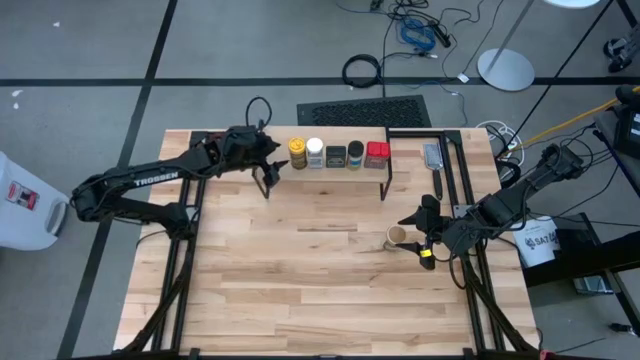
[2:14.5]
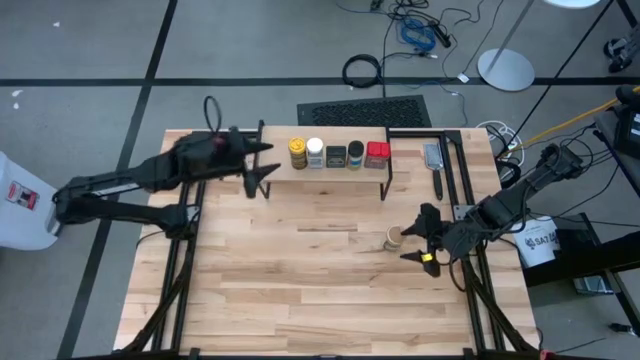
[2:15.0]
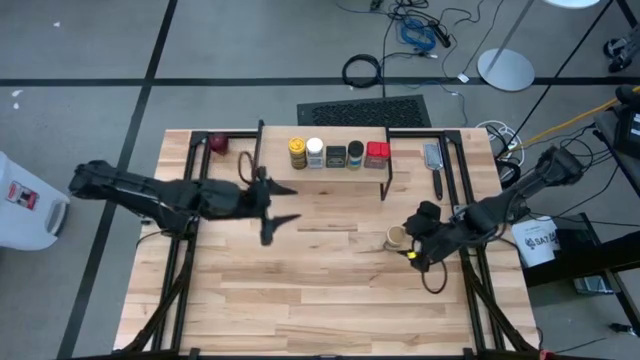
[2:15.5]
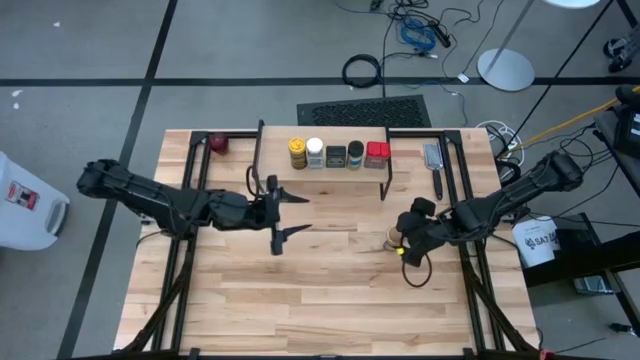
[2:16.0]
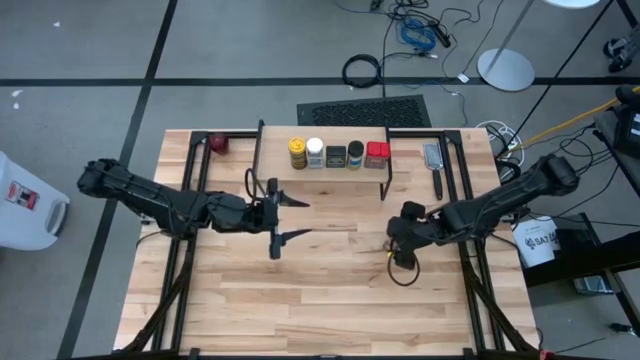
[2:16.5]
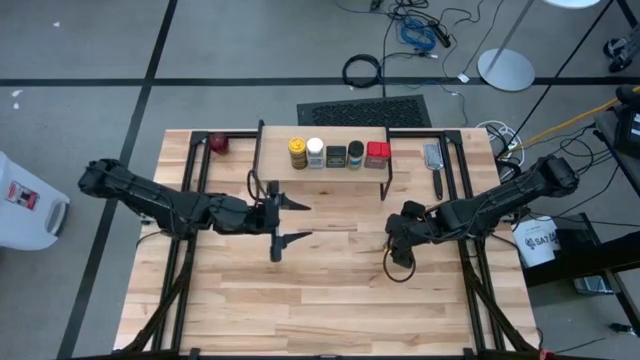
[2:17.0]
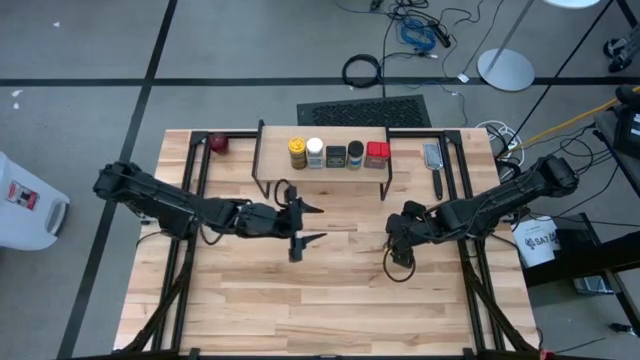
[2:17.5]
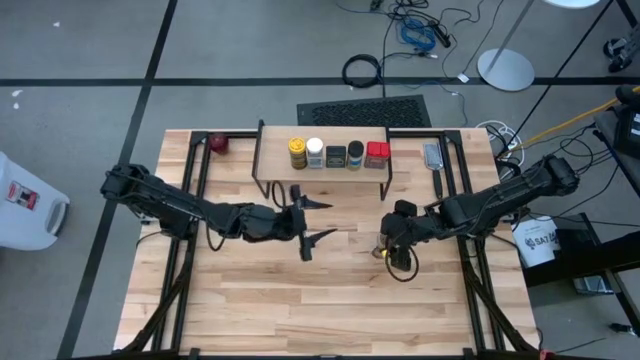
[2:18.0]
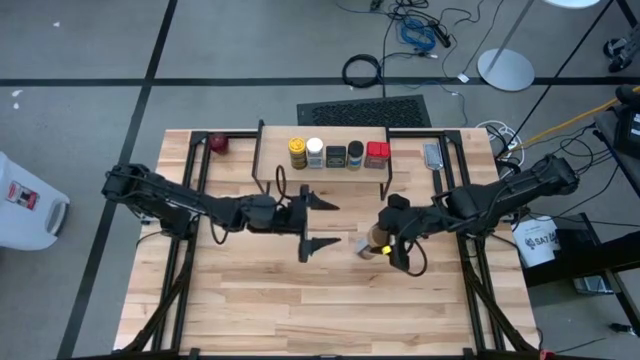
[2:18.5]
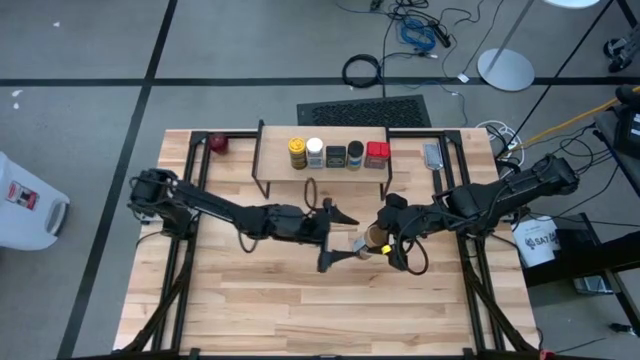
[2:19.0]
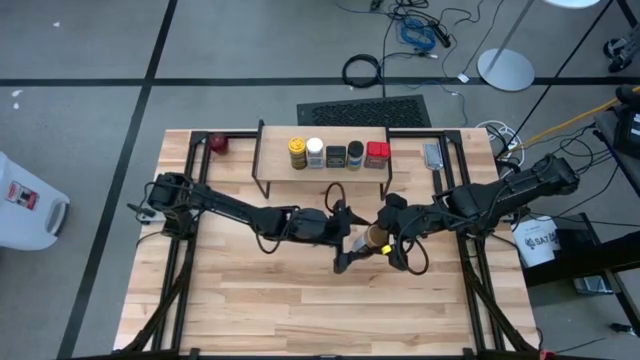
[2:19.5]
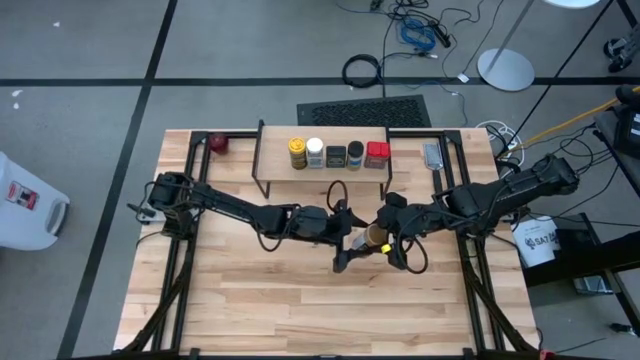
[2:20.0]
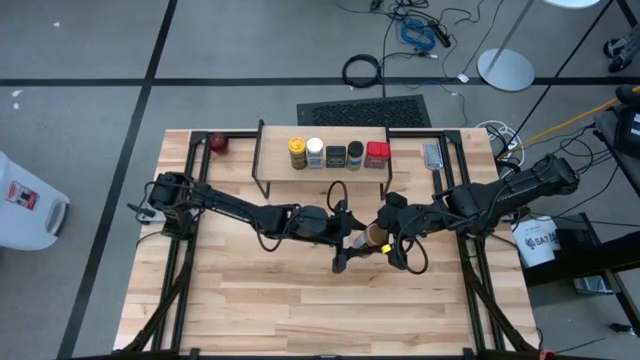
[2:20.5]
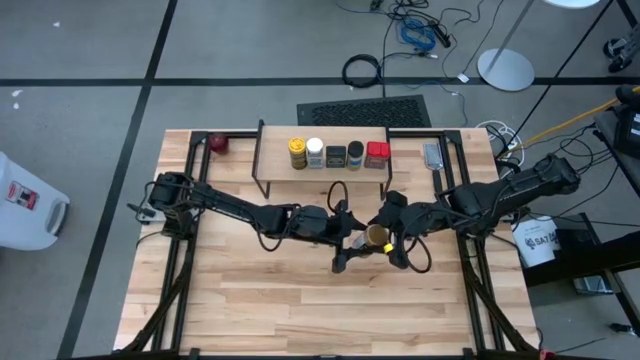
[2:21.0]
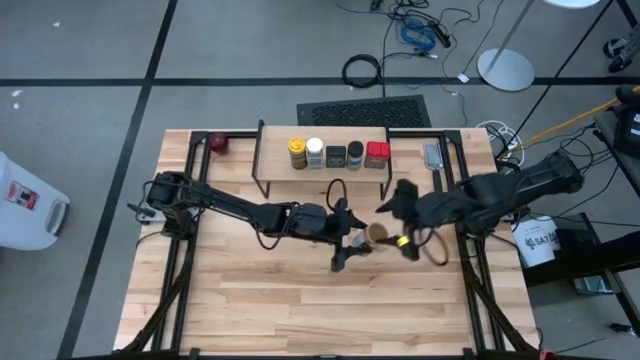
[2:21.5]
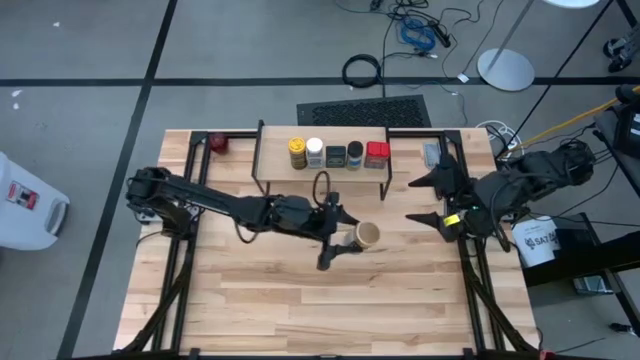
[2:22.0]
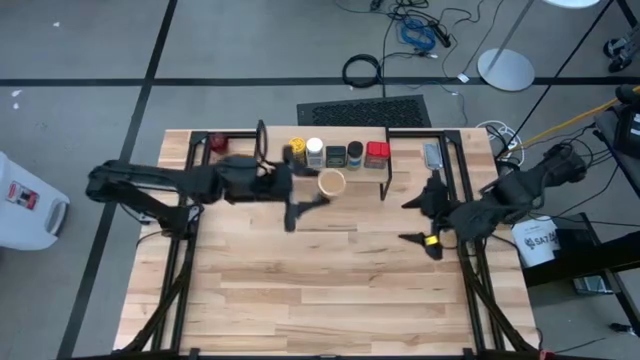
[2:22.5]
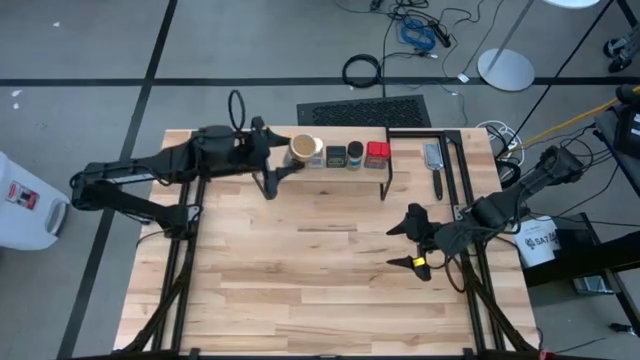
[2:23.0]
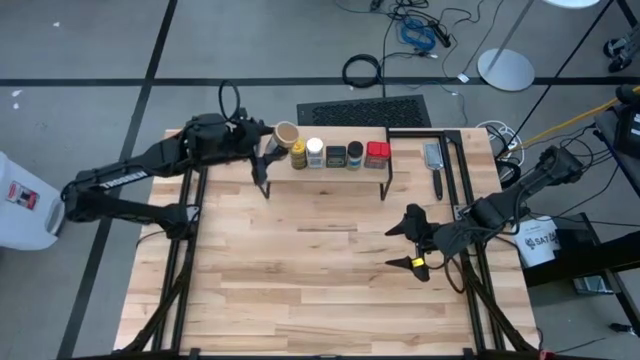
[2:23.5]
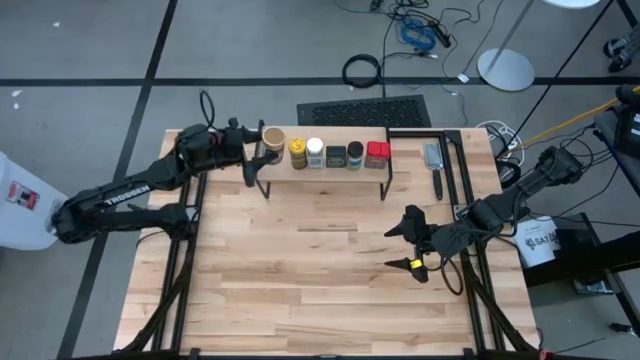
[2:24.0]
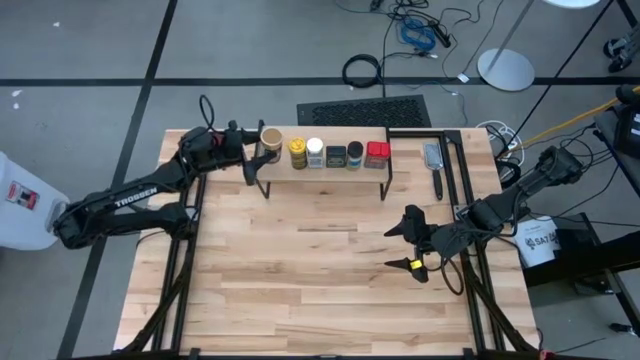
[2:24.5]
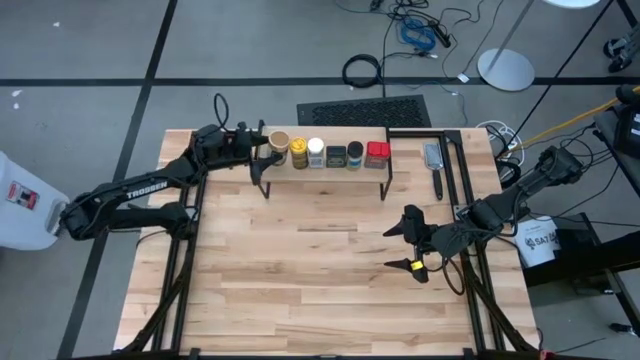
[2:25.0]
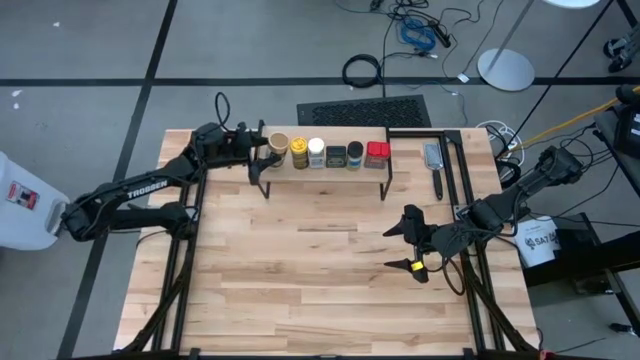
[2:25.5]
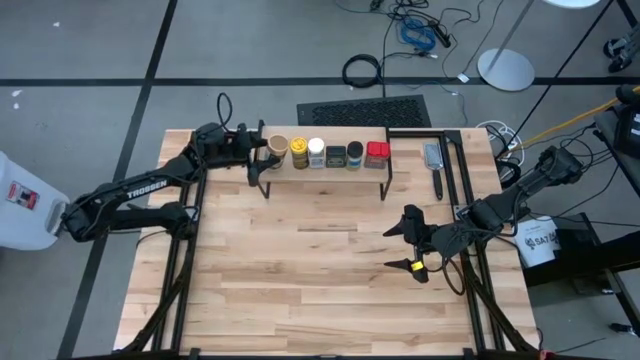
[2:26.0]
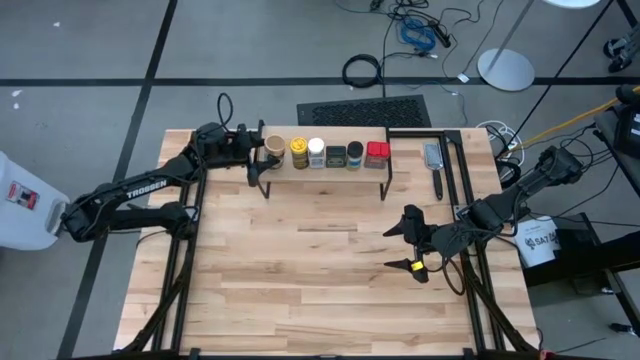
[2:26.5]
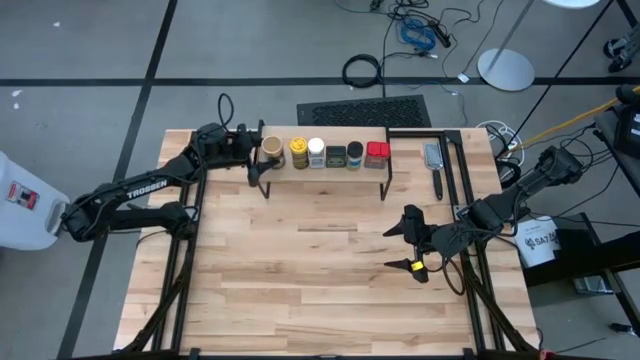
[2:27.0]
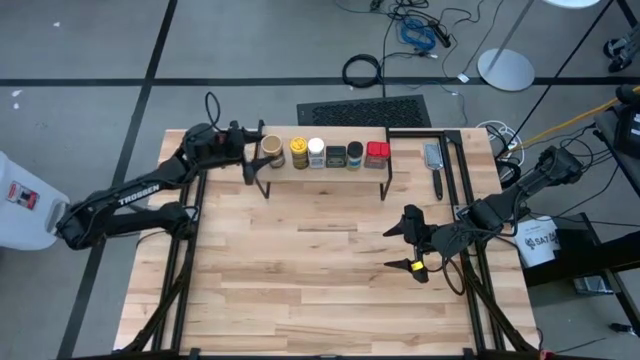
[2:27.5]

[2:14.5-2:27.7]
Task: Shelf spices
Put the brown seasoning bottle on the shelf

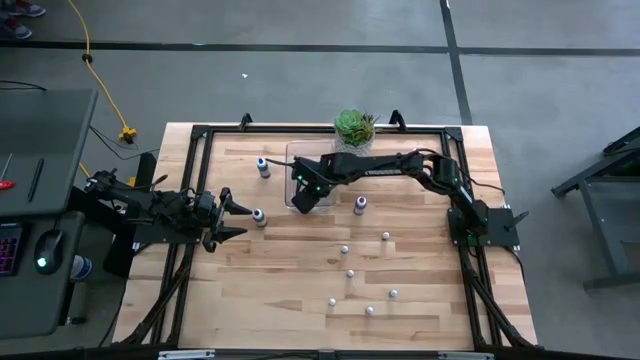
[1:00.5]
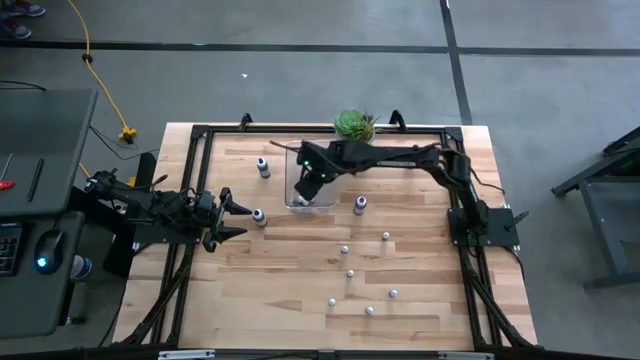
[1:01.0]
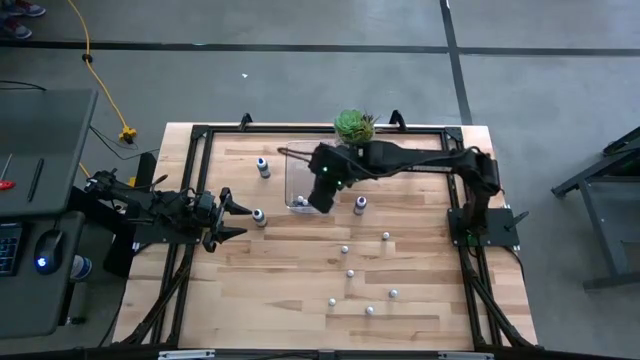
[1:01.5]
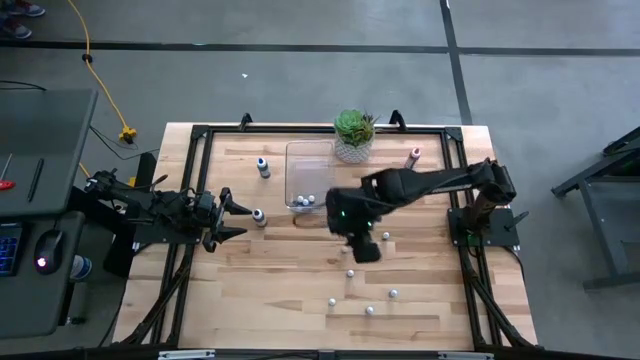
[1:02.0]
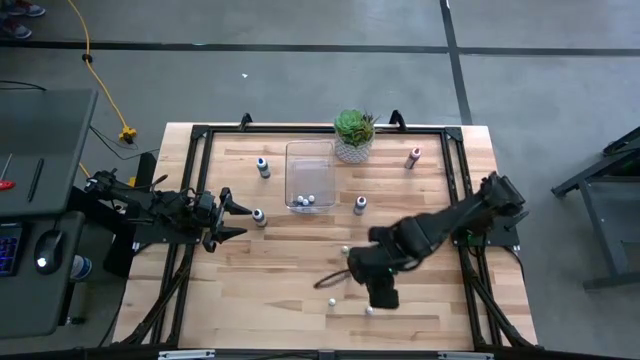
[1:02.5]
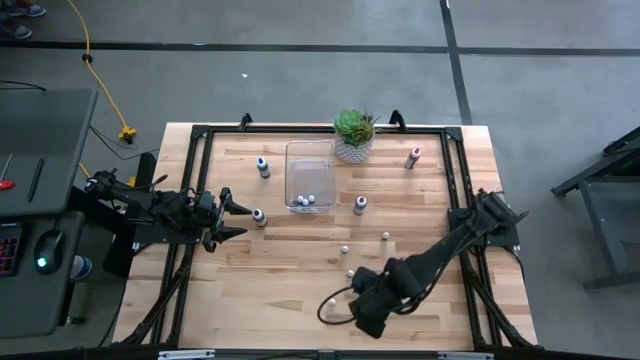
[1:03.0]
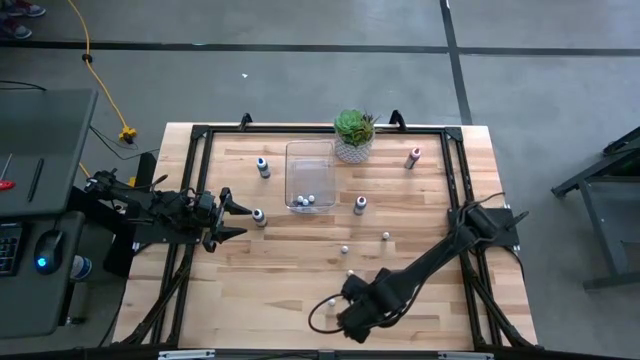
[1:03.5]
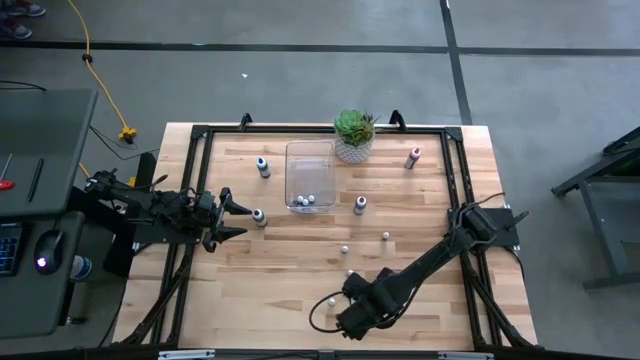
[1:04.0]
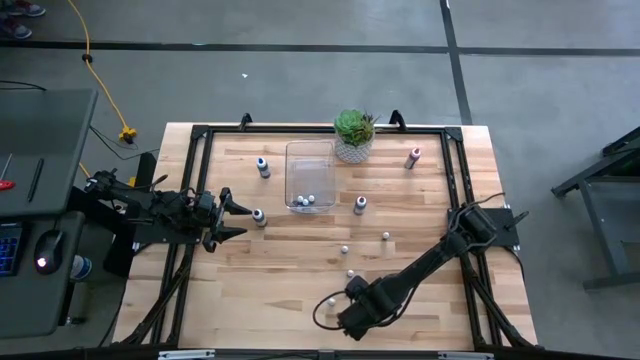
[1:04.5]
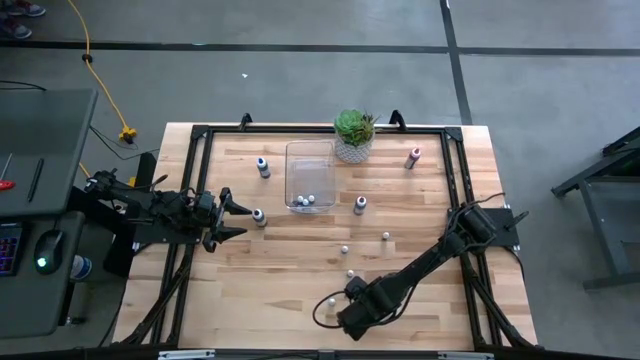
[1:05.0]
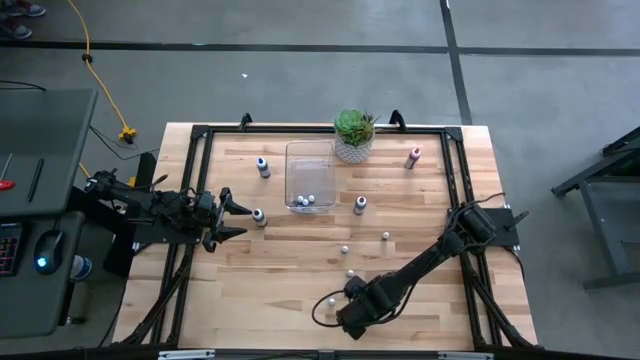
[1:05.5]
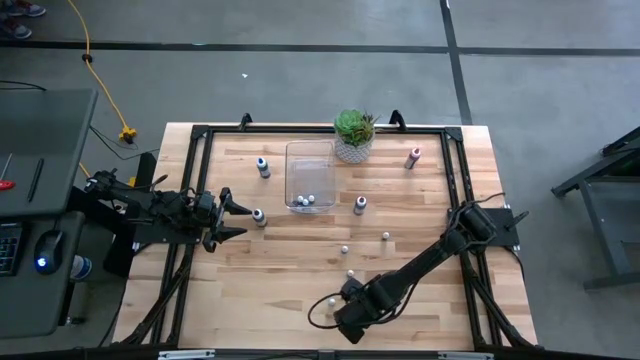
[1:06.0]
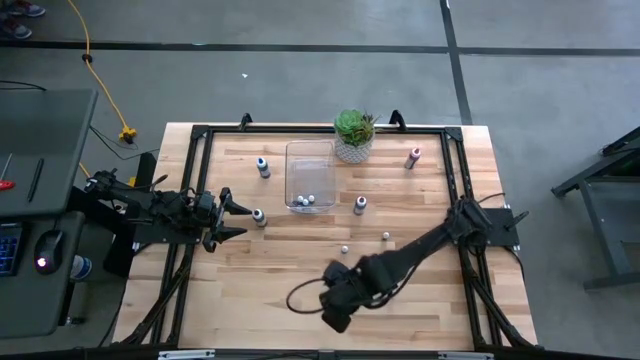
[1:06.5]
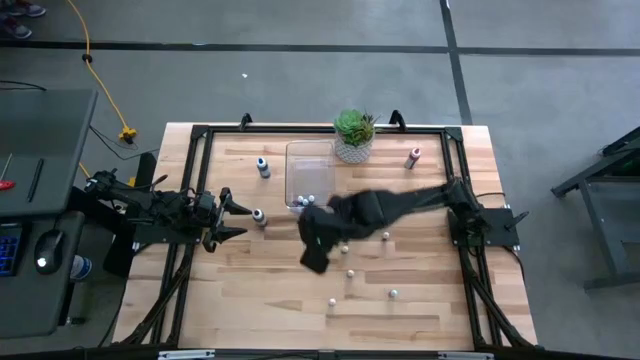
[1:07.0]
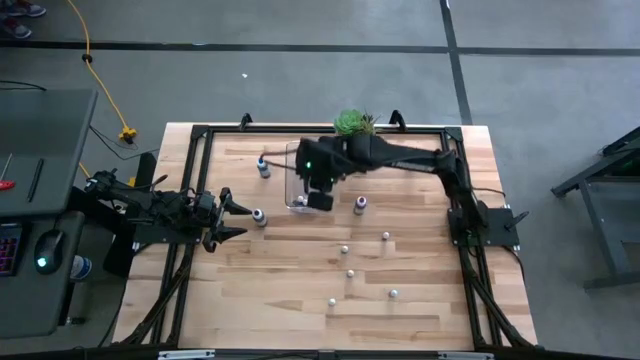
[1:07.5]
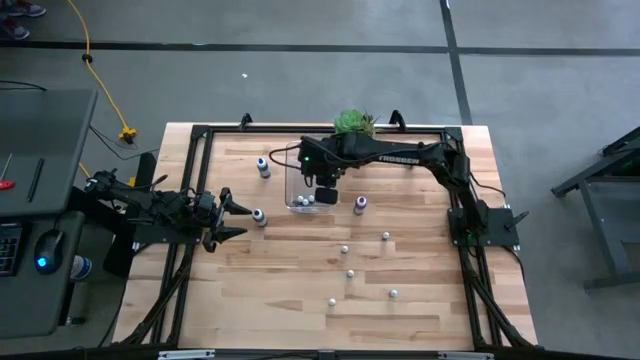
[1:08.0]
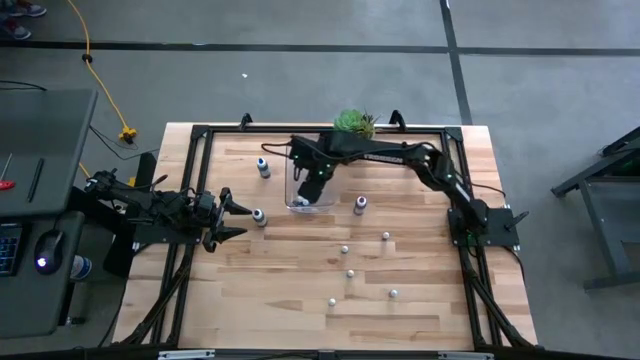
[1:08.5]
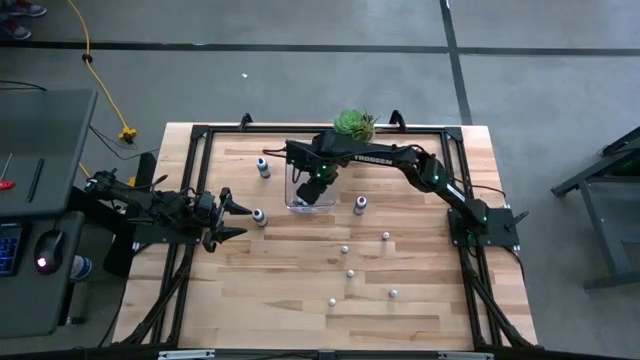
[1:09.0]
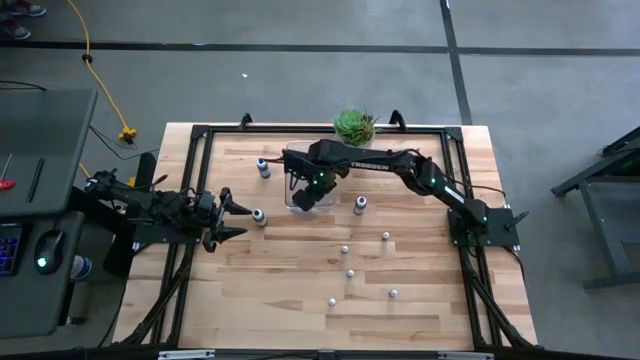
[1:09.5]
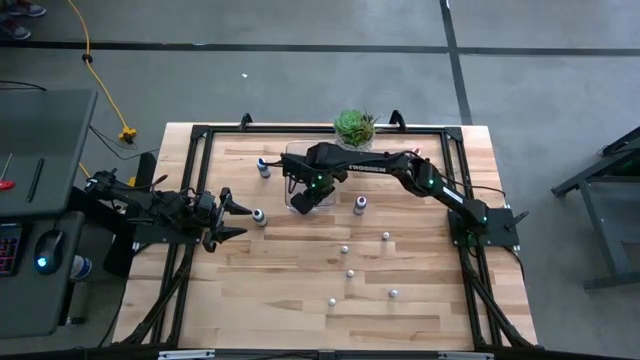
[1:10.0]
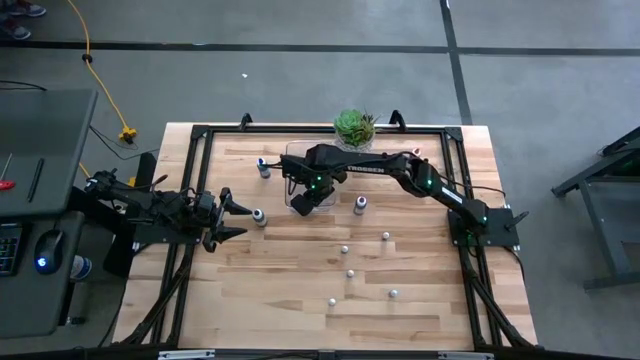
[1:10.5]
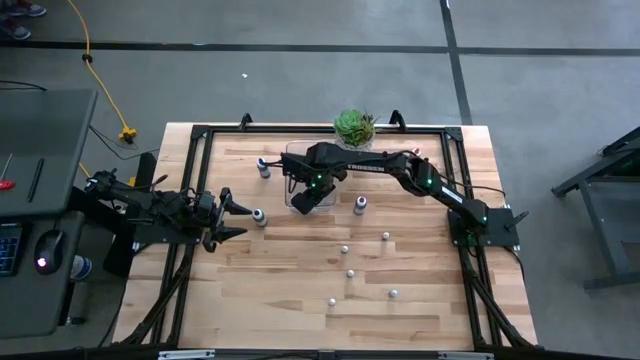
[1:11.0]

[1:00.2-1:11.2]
Task: Pick & Place food coloring
Put the small red food coloring bottle into the transparent bin
